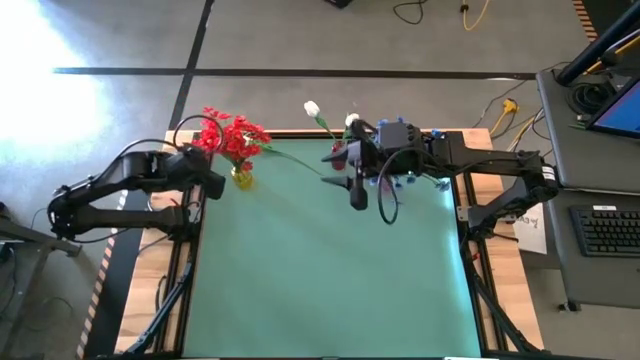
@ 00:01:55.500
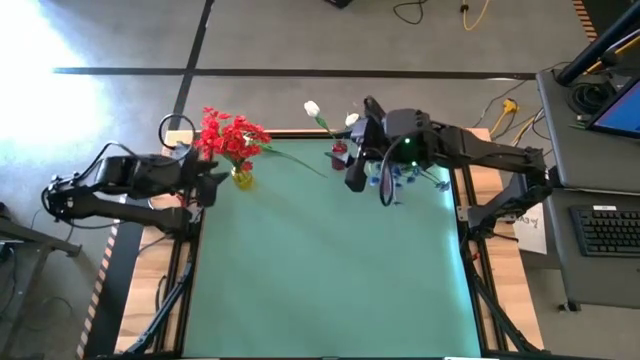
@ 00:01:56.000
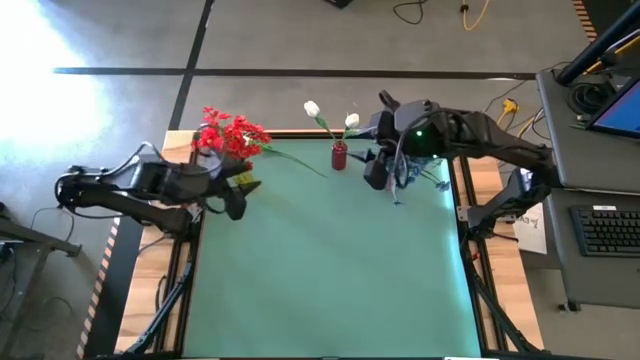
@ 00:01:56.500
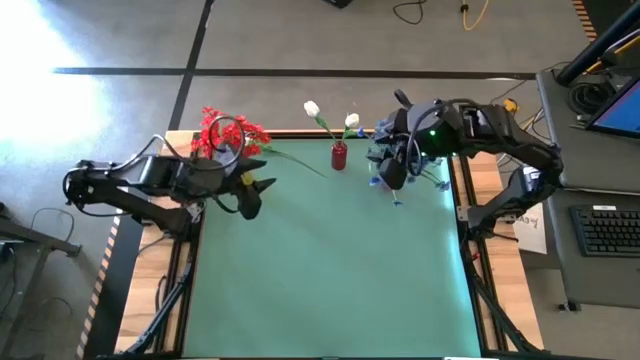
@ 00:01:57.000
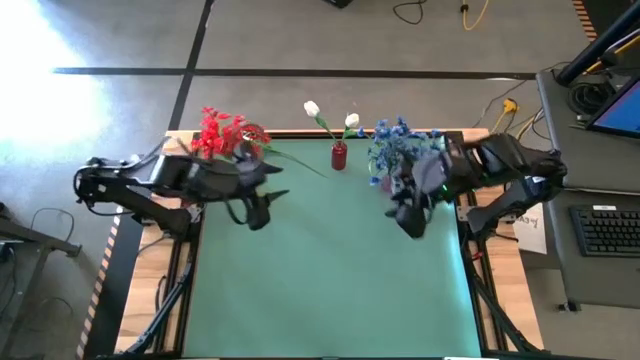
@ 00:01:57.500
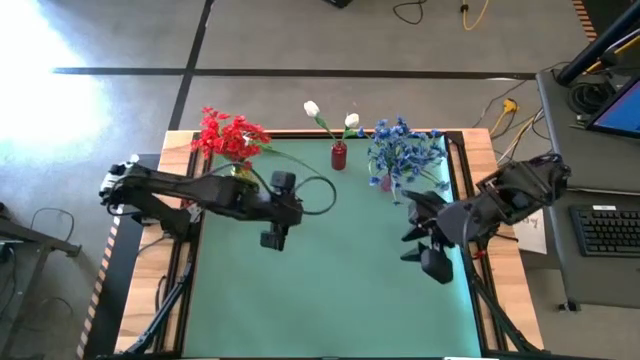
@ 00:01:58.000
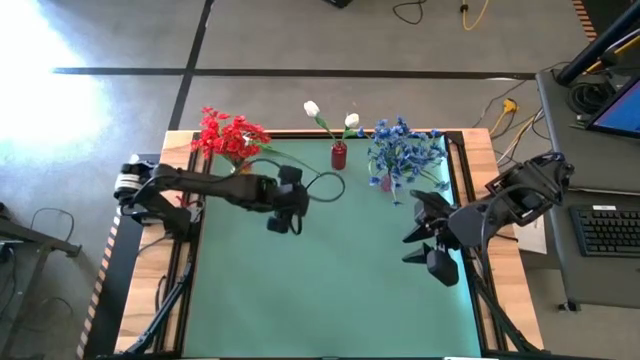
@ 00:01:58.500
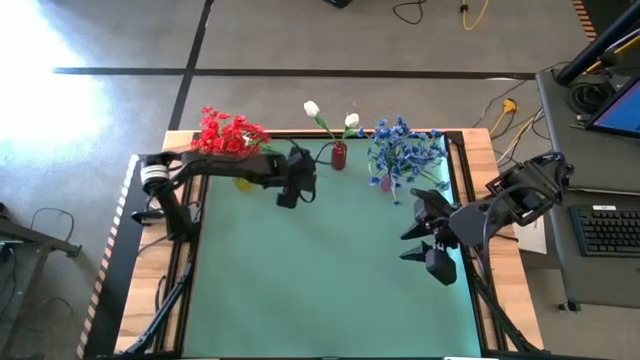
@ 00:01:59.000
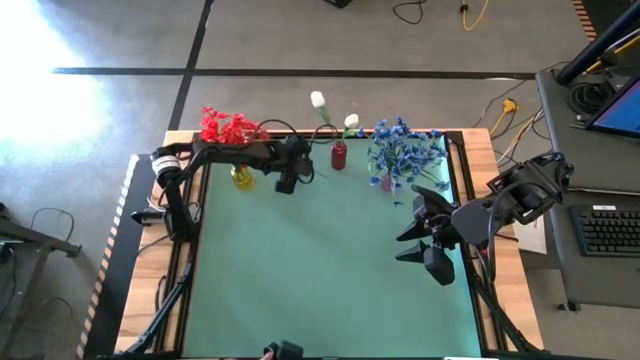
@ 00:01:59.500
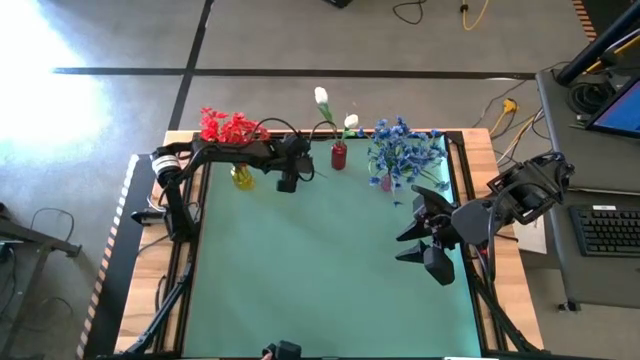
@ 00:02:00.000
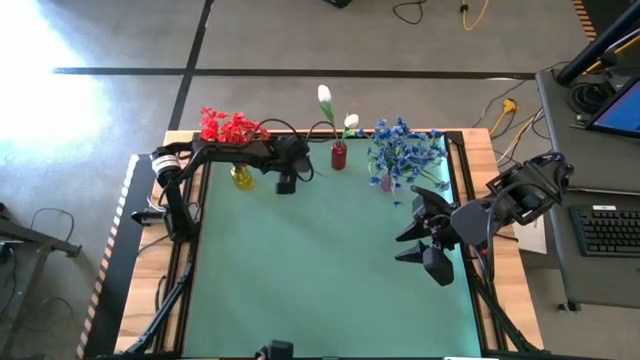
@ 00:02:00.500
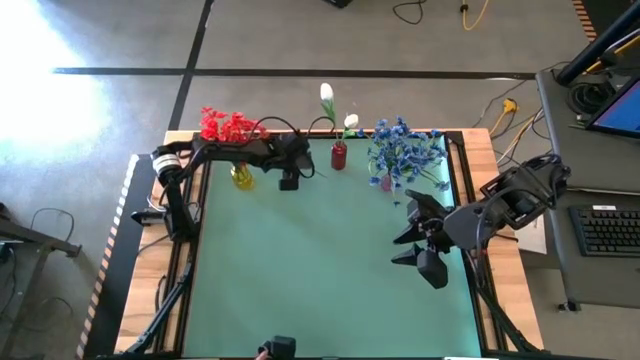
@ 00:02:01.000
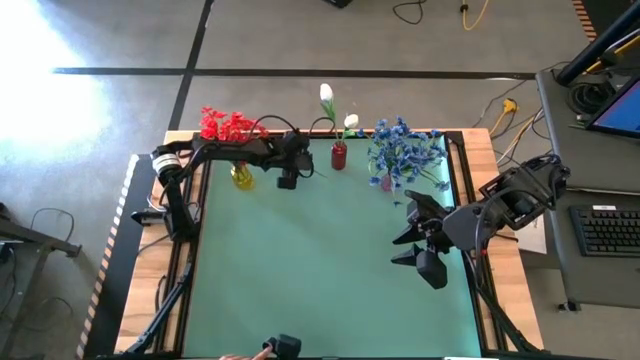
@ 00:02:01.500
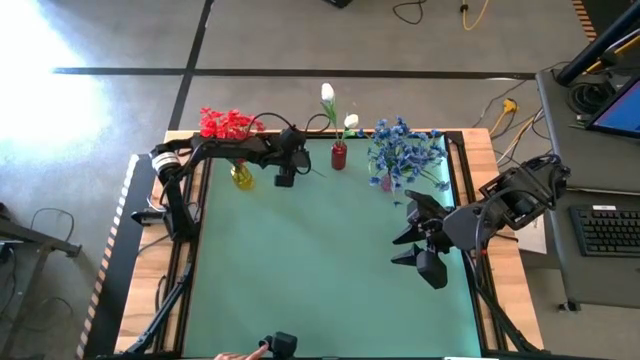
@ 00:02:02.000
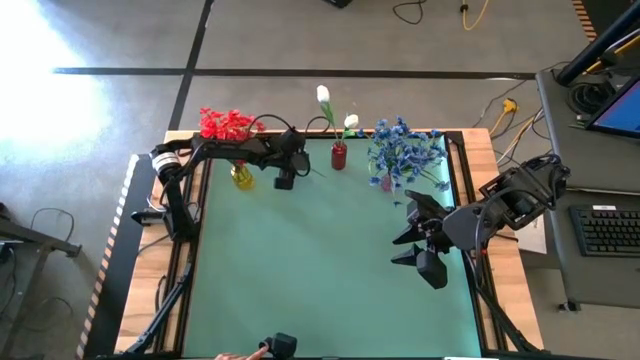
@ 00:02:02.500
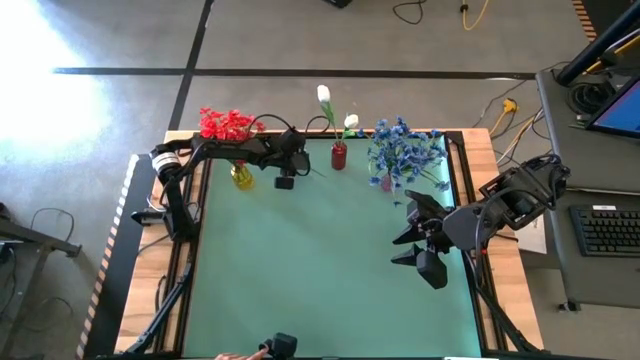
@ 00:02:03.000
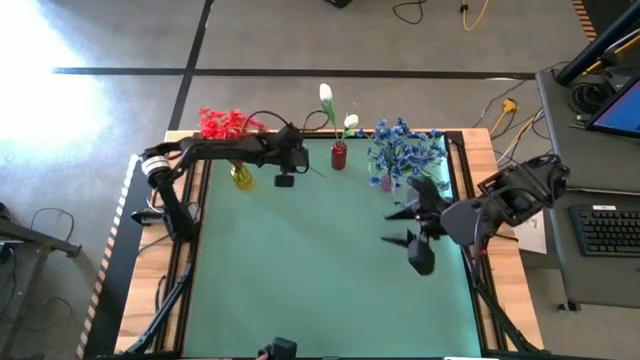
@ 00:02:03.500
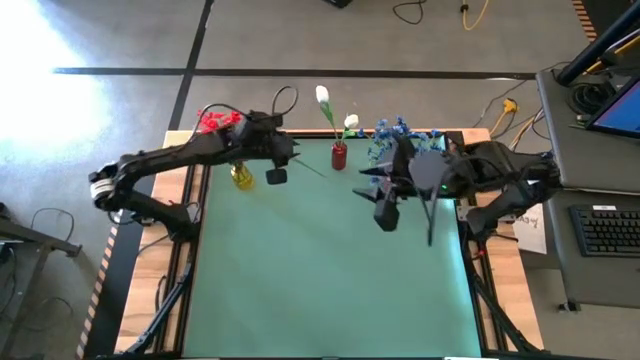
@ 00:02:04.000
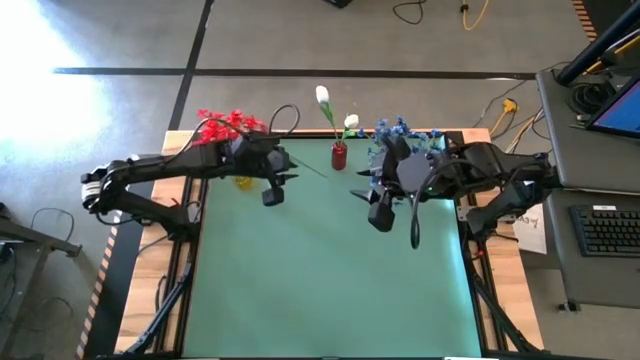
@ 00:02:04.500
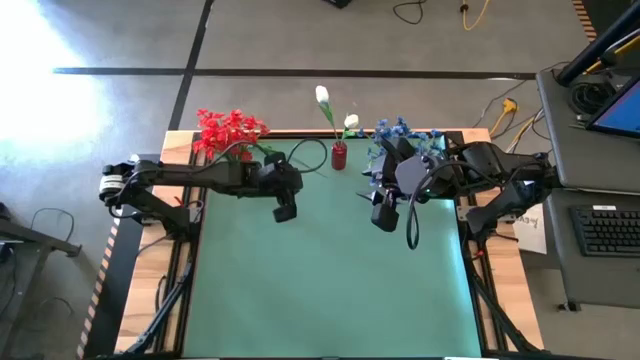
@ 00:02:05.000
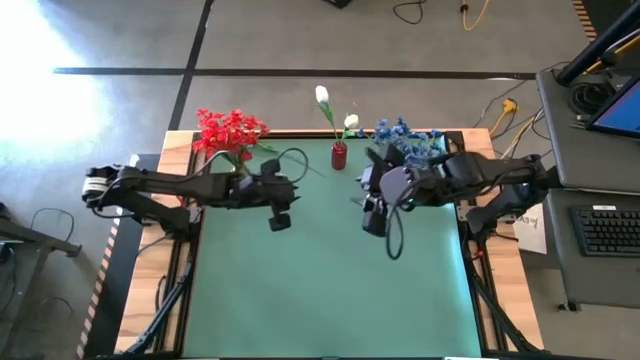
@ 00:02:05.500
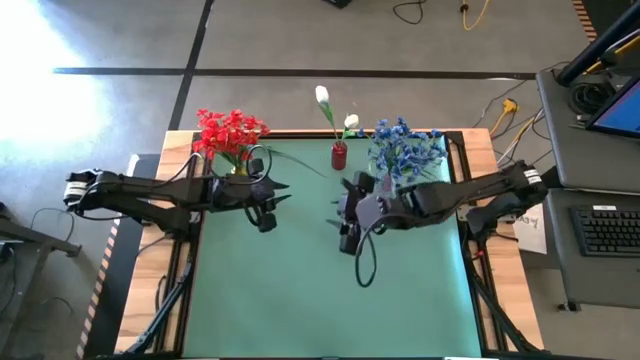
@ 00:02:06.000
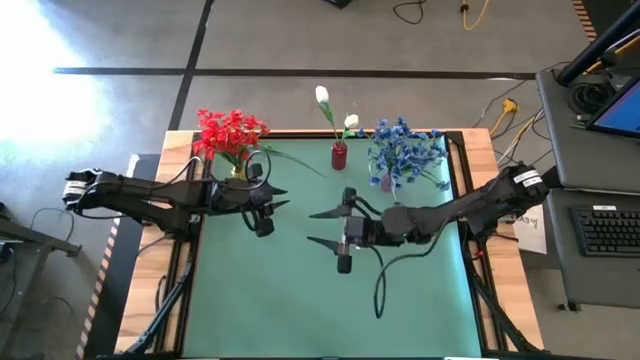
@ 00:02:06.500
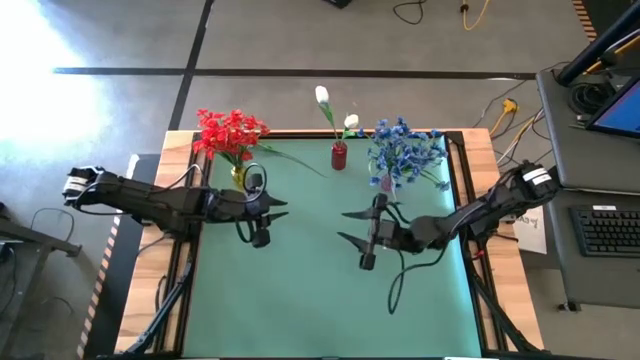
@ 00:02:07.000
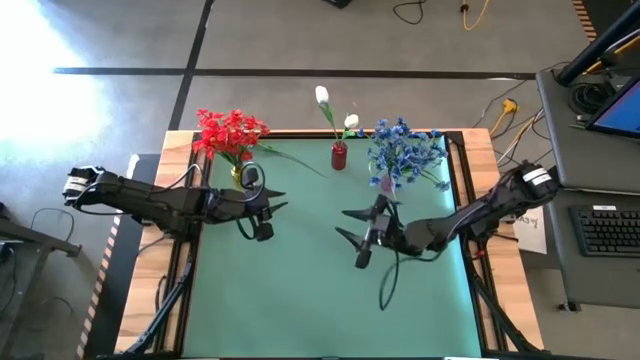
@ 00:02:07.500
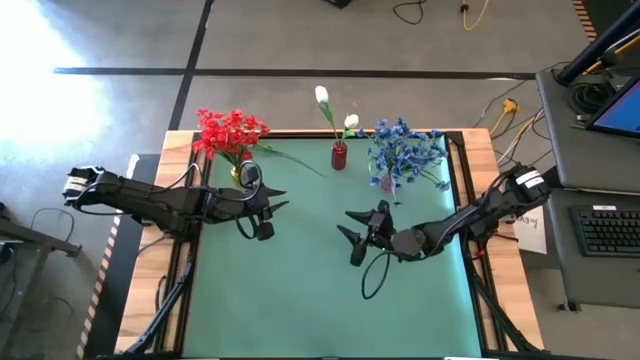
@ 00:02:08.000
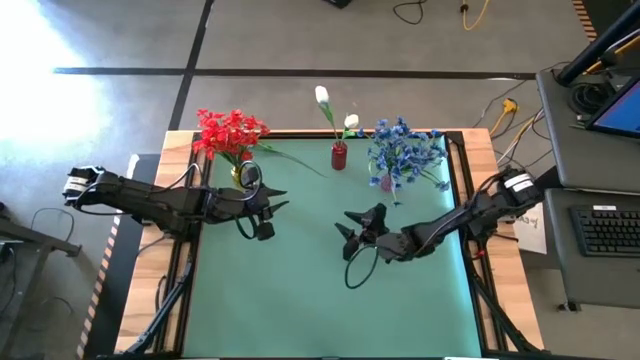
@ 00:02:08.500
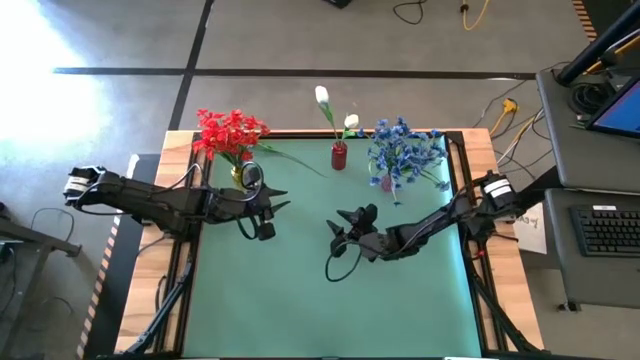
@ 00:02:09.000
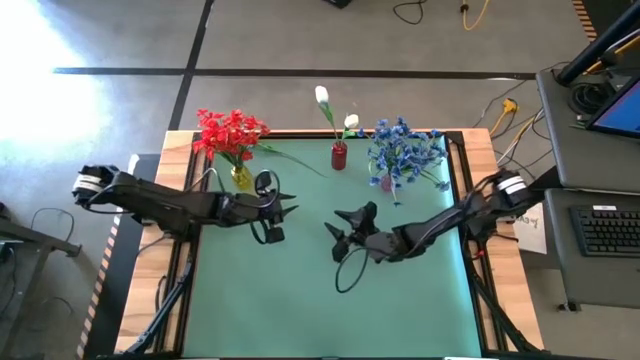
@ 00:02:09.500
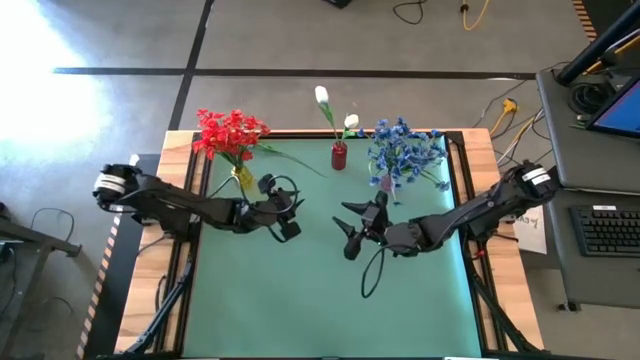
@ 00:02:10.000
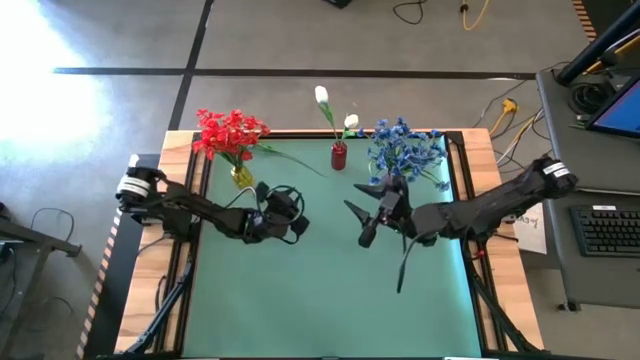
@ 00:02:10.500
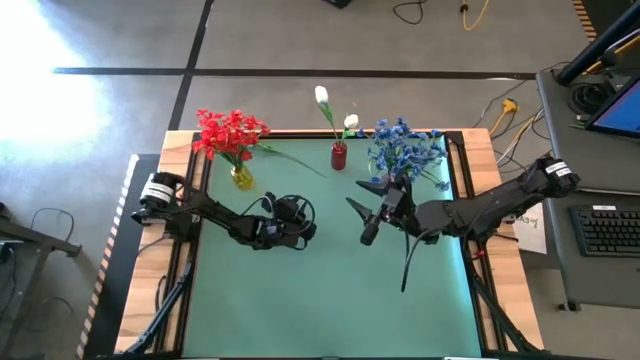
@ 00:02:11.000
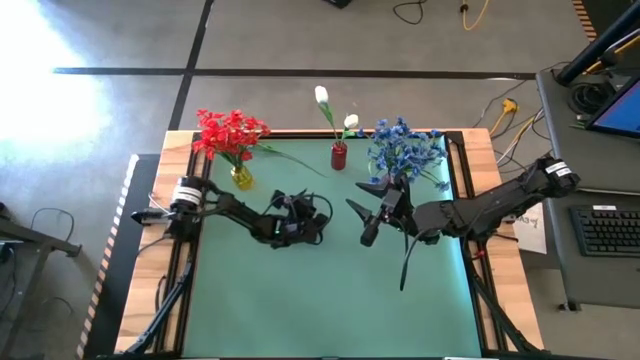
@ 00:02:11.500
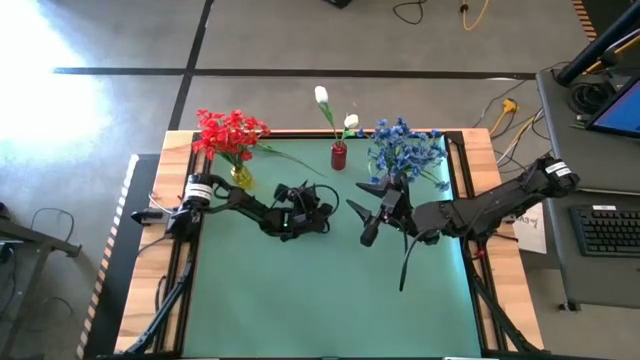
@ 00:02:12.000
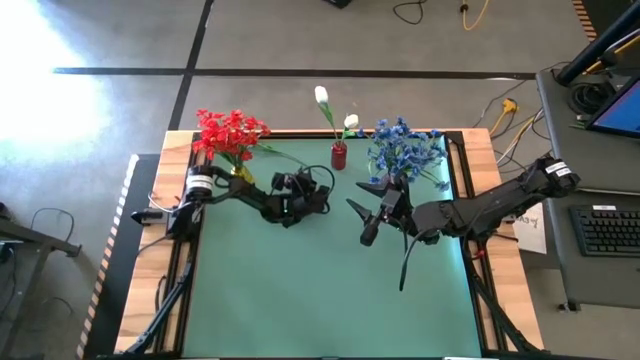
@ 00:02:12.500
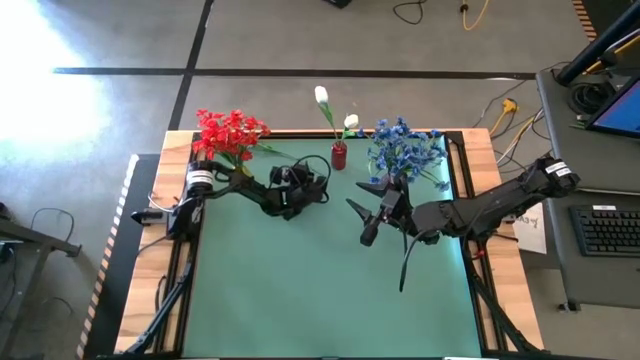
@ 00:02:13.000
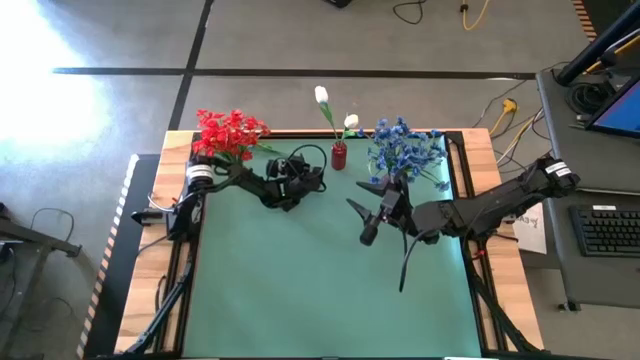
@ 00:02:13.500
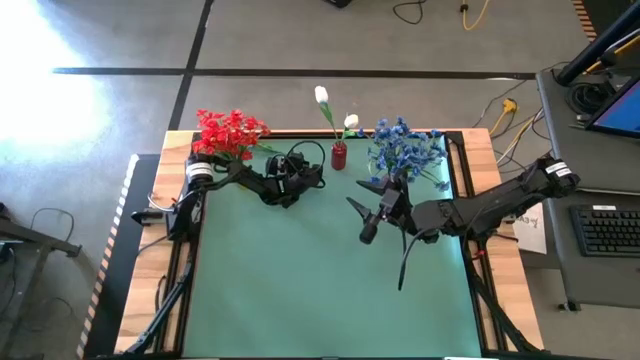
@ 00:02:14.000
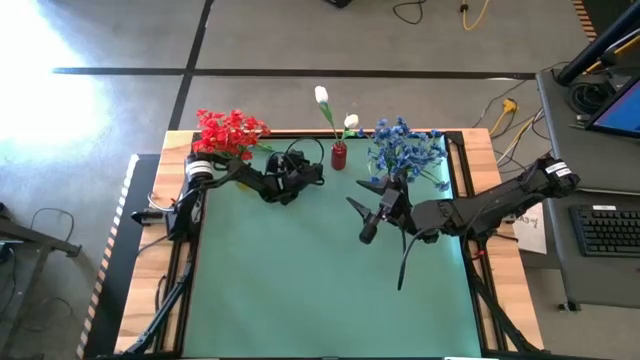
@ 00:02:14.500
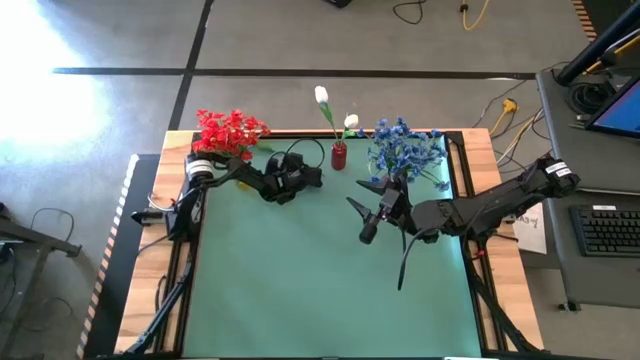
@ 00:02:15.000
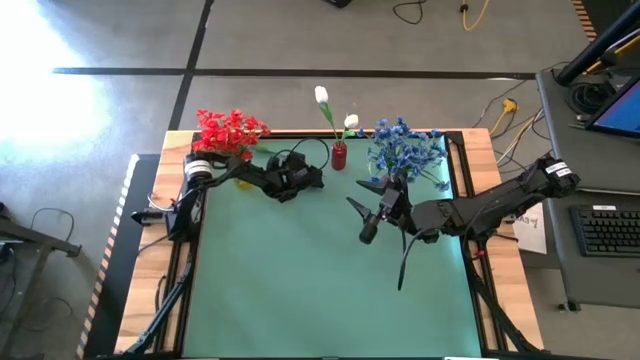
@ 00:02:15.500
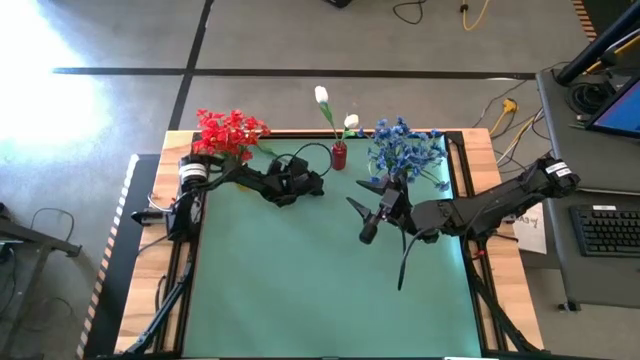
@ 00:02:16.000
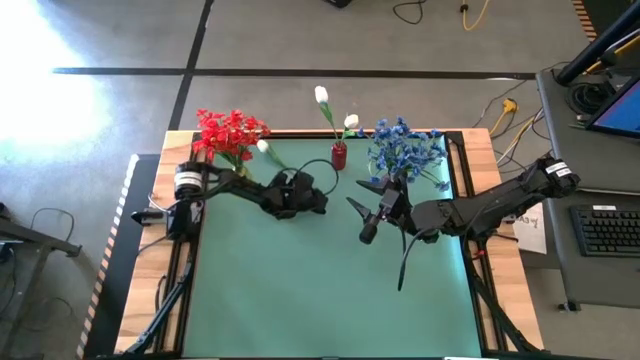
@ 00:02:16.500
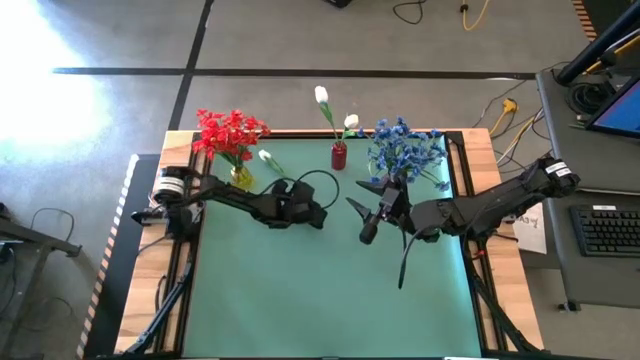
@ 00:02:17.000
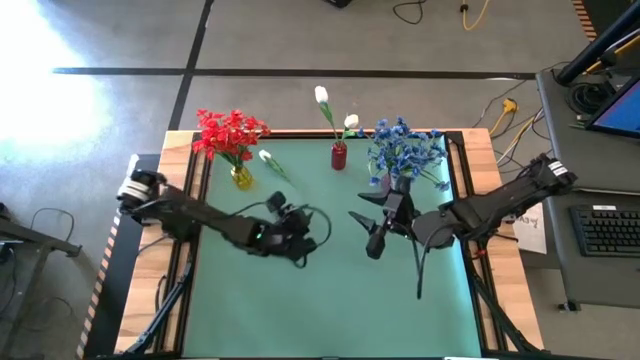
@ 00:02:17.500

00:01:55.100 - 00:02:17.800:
Task: Sort flowers into vase by color
Put the white flower into the red vase
